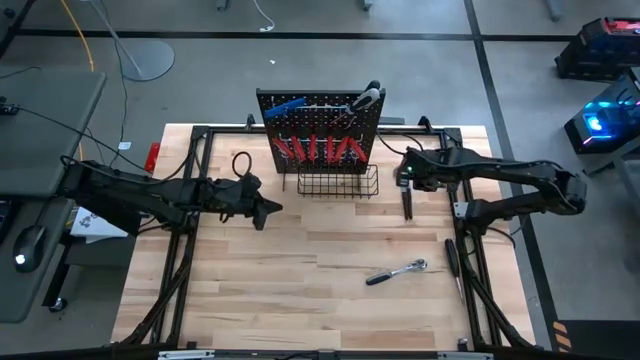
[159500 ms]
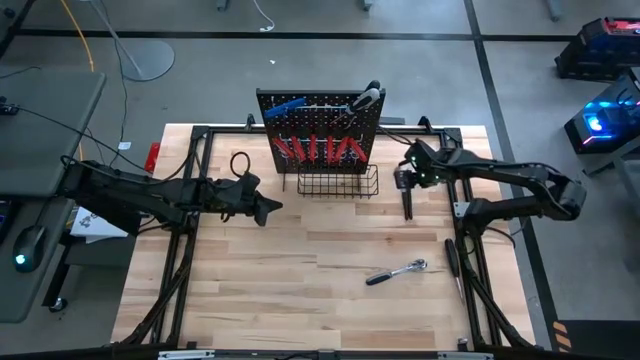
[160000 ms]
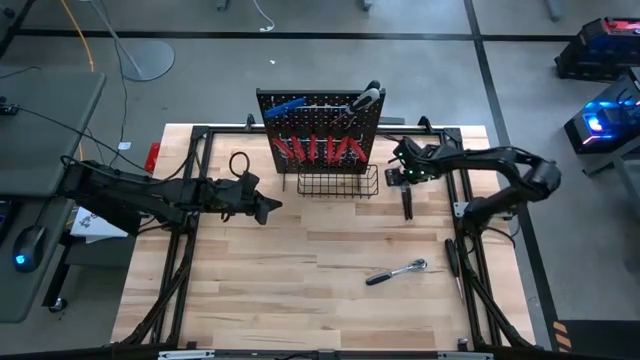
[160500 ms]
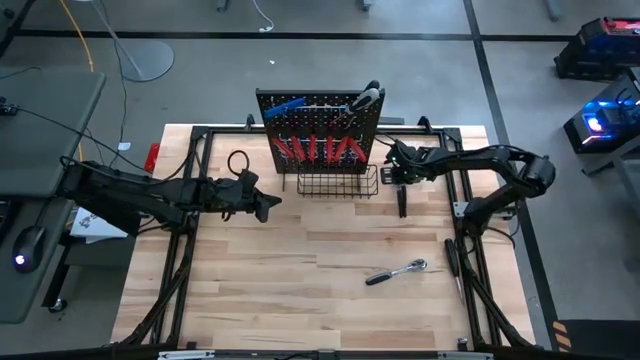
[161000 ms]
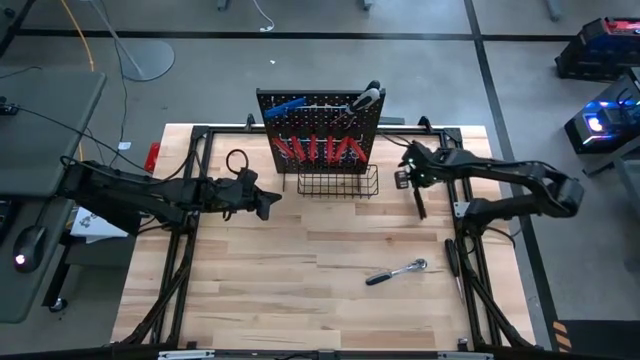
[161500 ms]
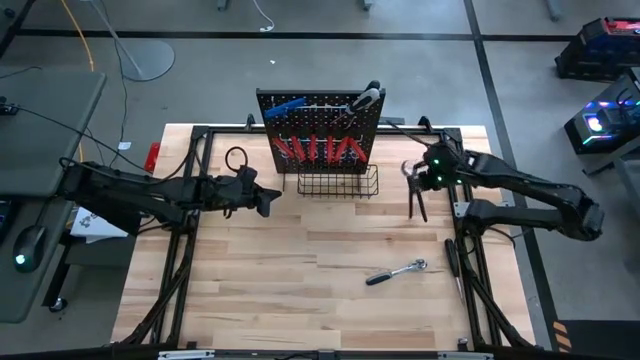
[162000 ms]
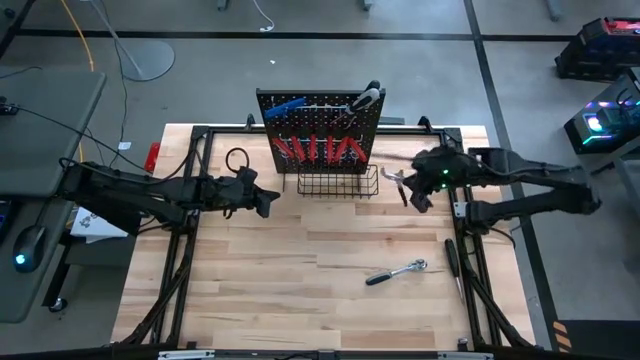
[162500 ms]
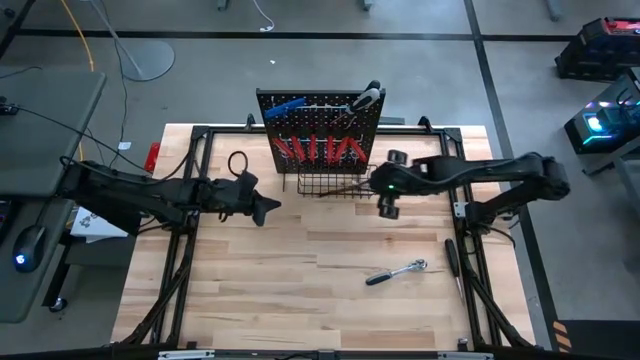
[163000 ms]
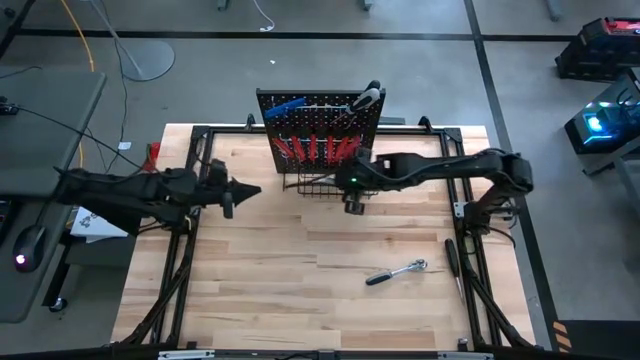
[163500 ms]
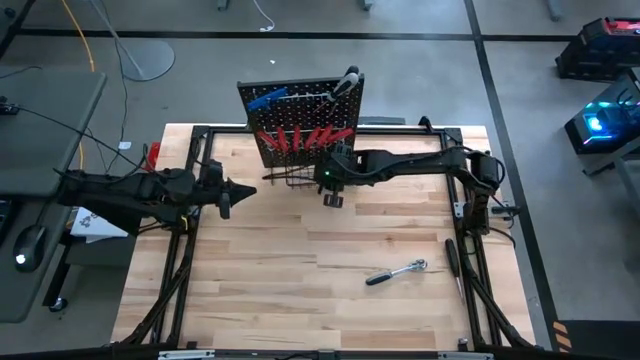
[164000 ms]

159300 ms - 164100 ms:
Task: Hang tools onto peg board
Put the slip joint pliers into the black wire basket on the peg board

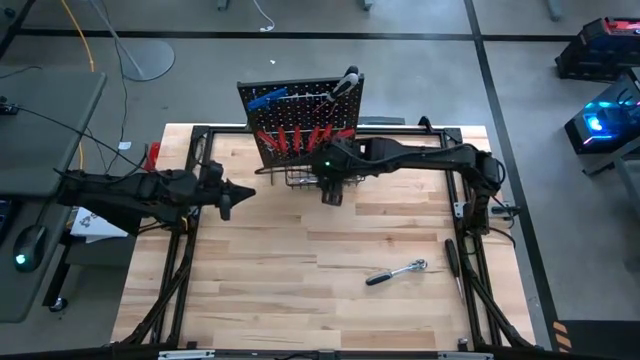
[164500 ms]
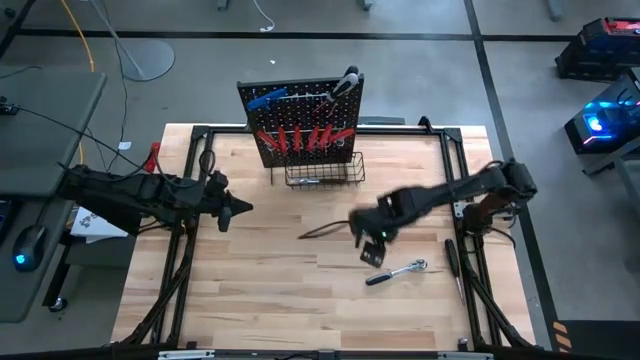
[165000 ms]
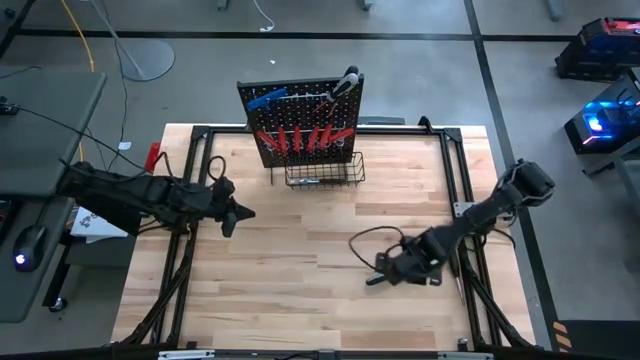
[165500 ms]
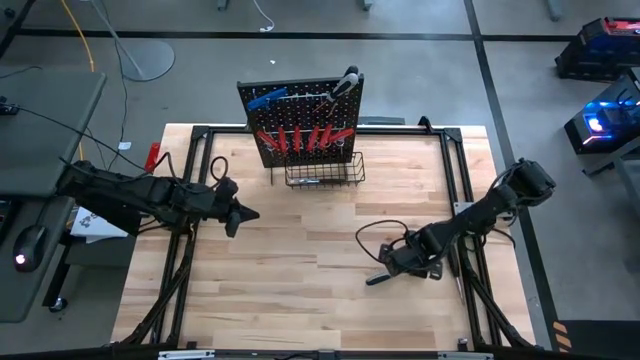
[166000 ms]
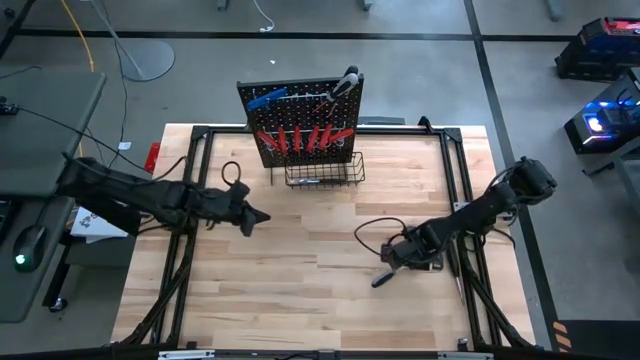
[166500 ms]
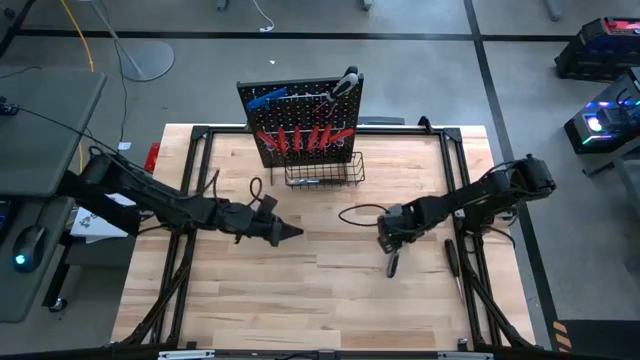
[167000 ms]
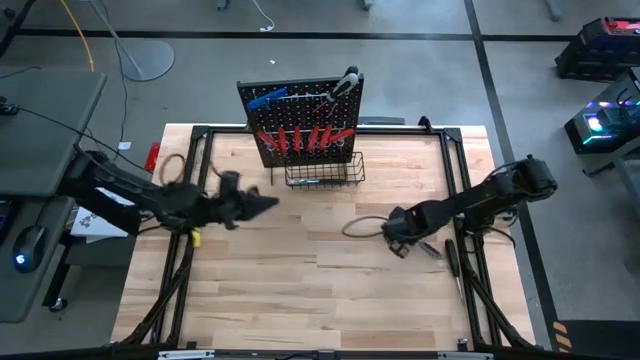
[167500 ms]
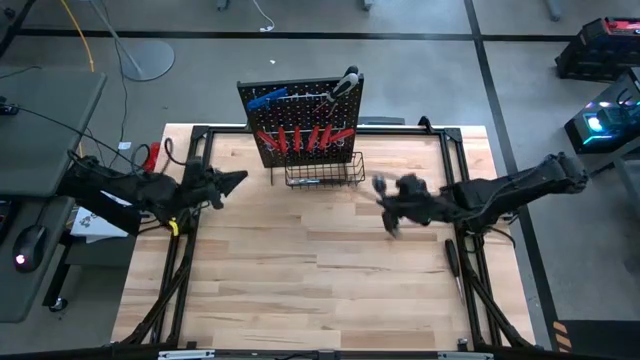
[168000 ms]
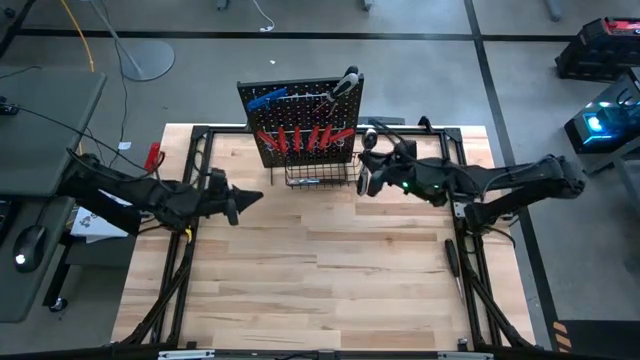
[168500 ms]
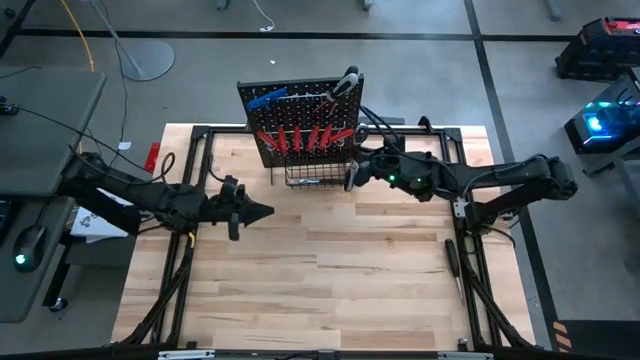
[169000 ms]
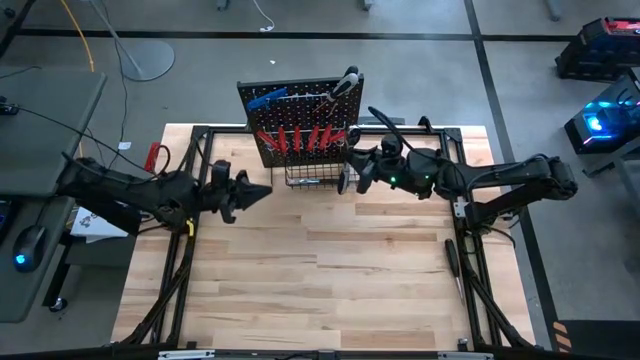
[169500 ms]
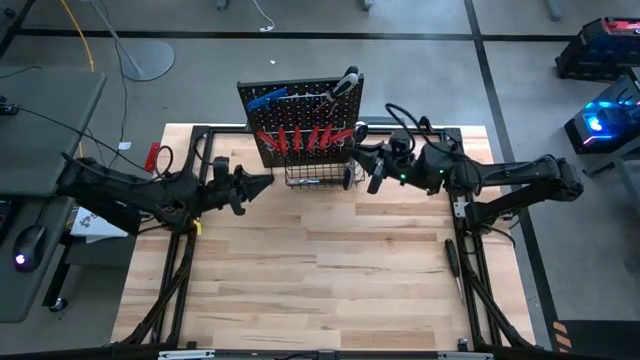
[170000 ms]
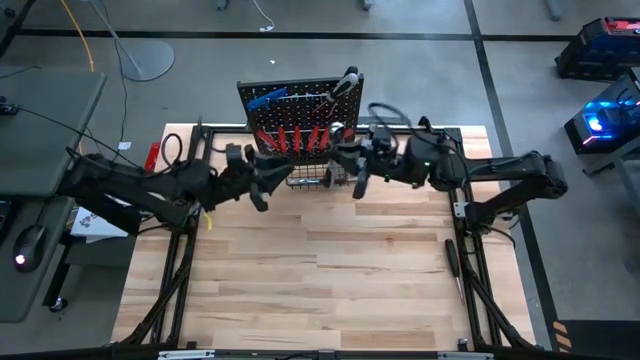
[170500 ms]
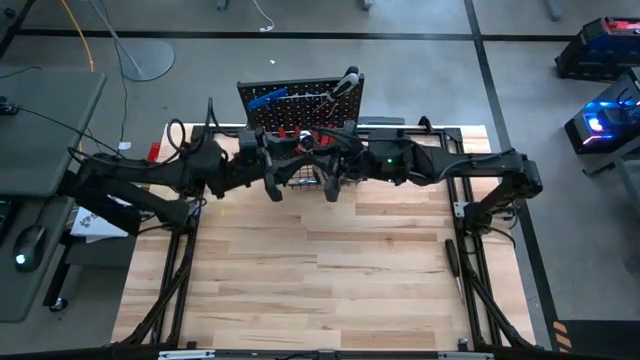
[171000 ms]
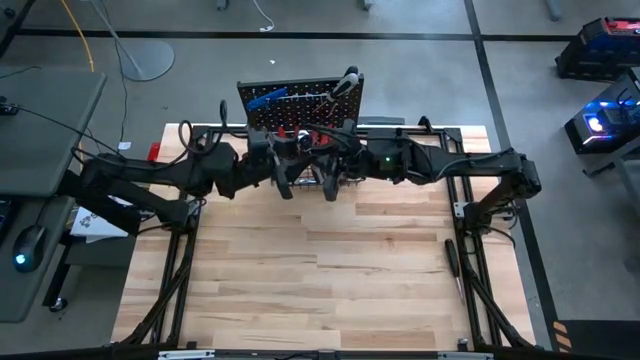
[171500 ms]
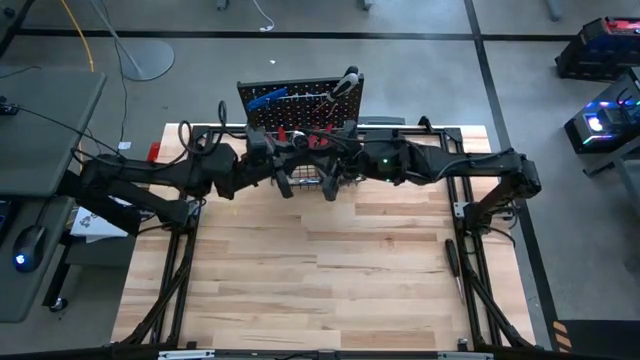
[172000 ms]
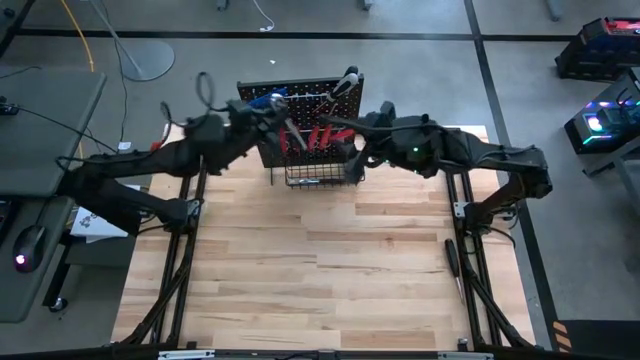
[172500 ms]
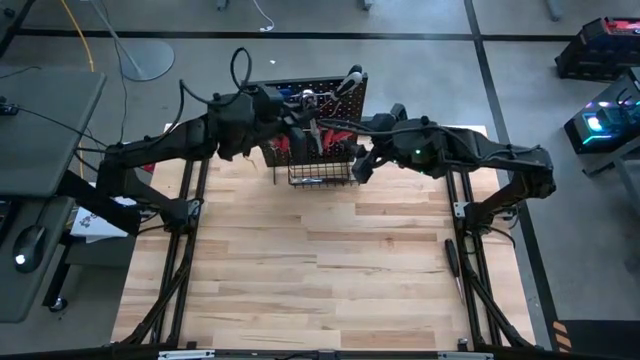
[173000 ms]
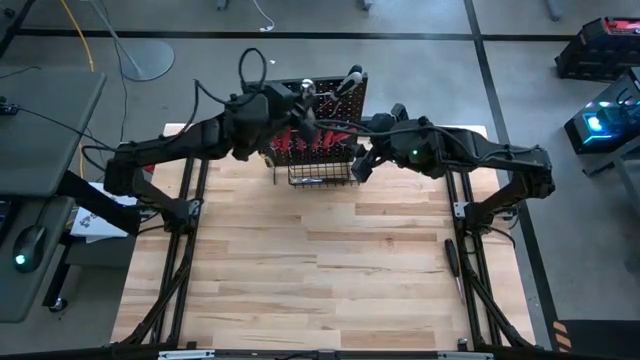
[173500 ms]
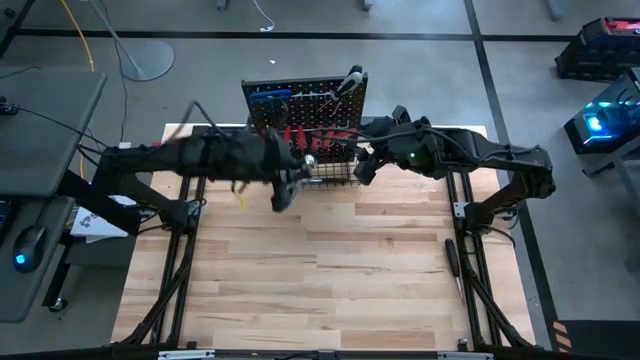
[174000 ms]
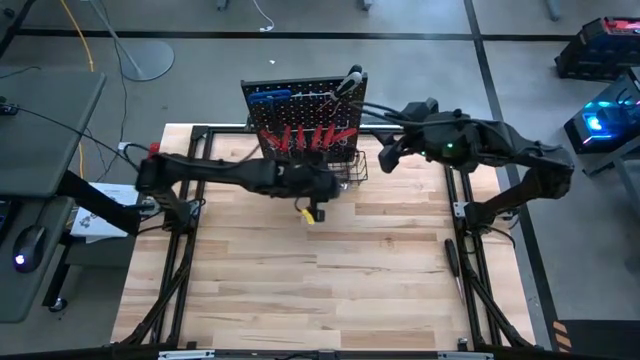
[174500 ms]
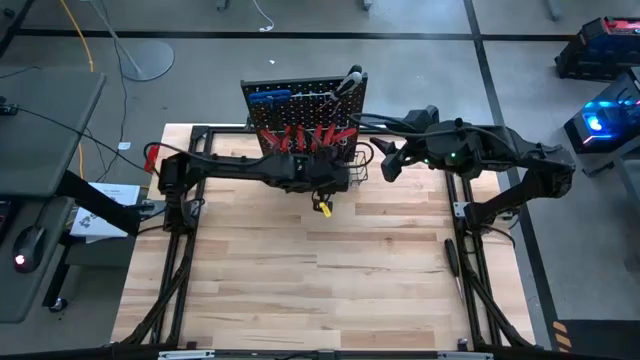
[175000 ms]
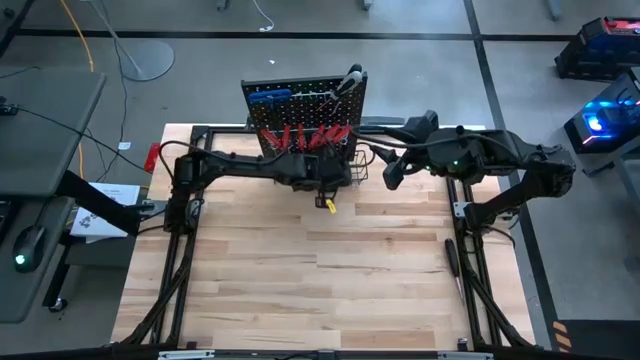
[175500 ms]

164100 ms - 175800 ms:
Put the ratchet wrench into the black wire basket on the peg board

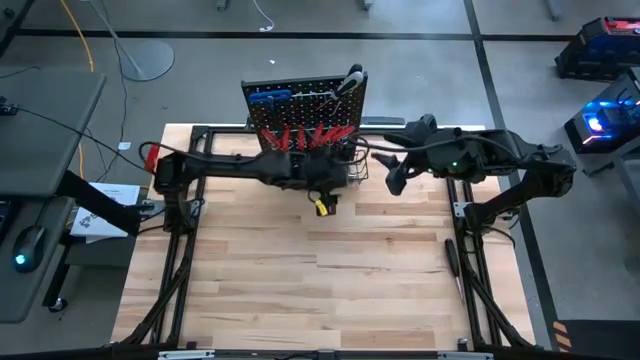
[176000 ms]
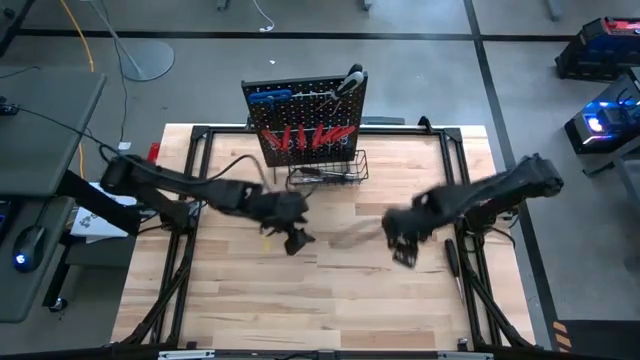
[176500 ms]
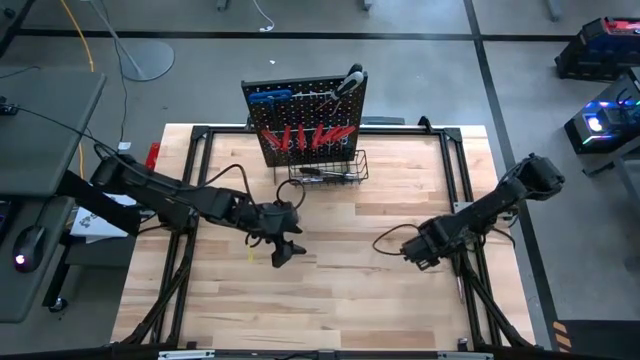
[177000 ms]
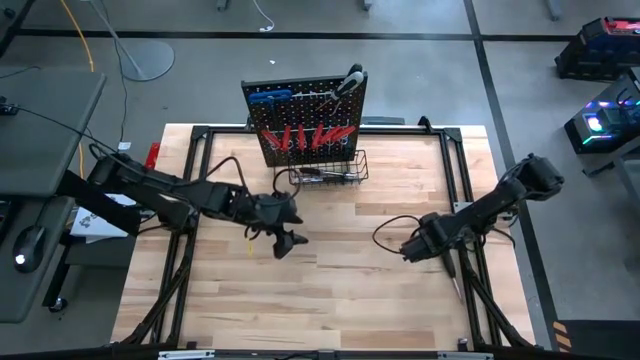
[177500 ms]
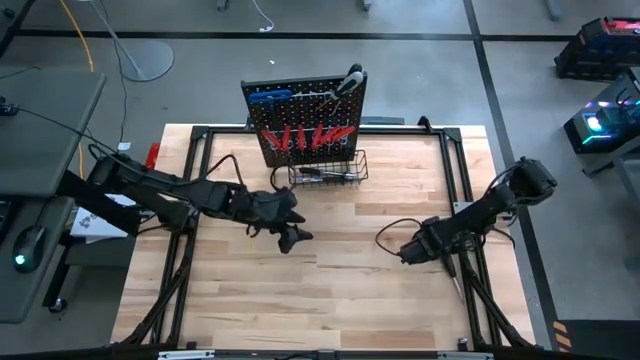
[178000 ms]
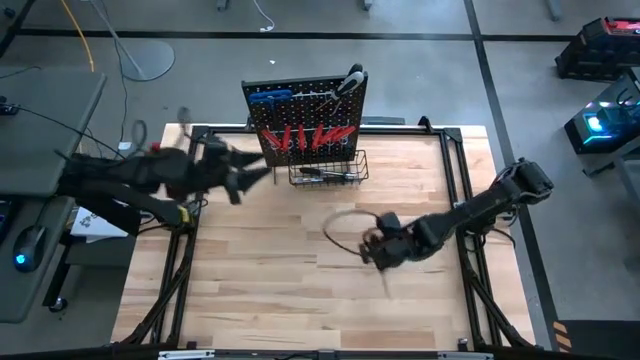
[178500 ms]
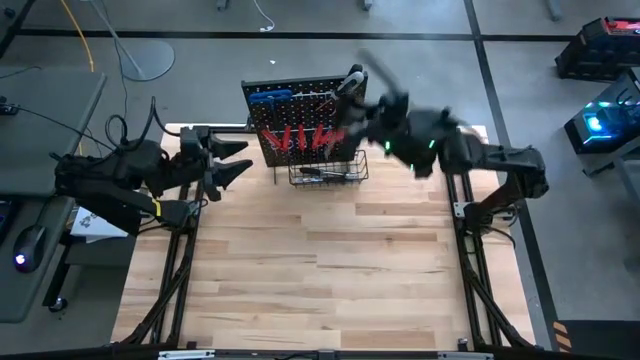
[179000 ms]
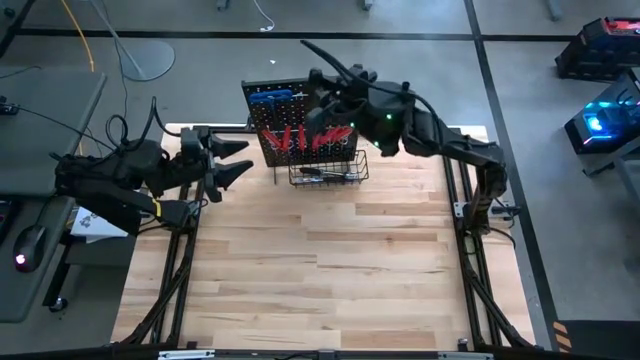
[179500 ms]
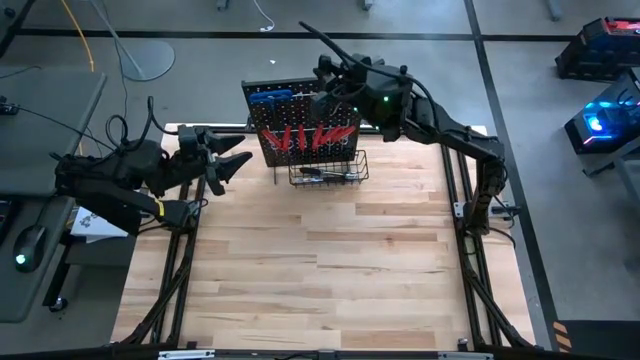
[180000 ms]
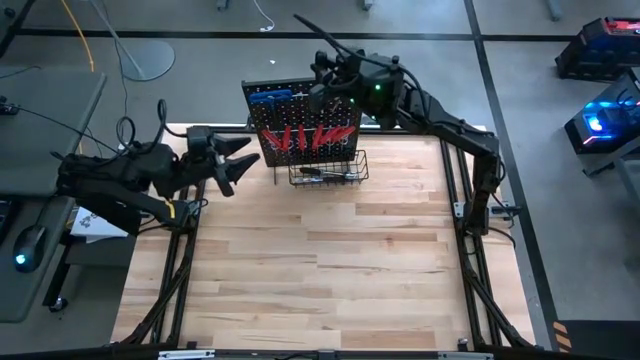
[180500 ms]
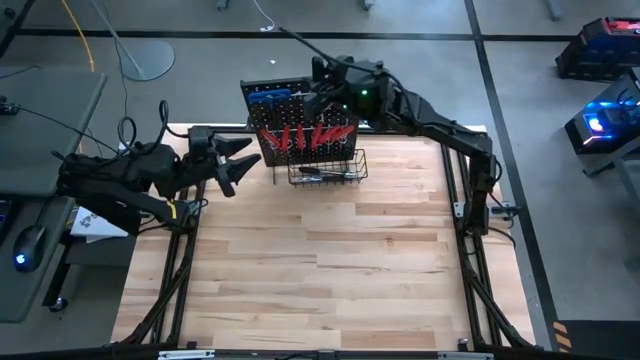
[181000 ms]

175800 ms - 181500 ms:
Hang the black screwdriver on the peg board

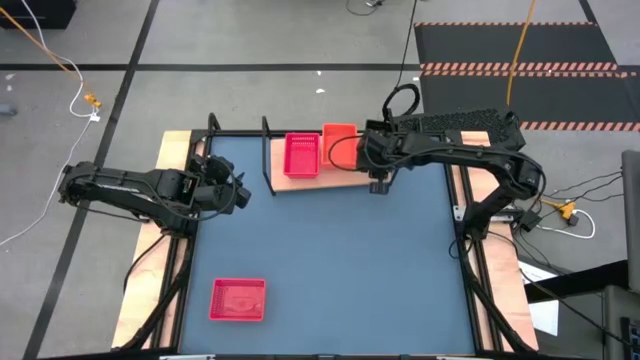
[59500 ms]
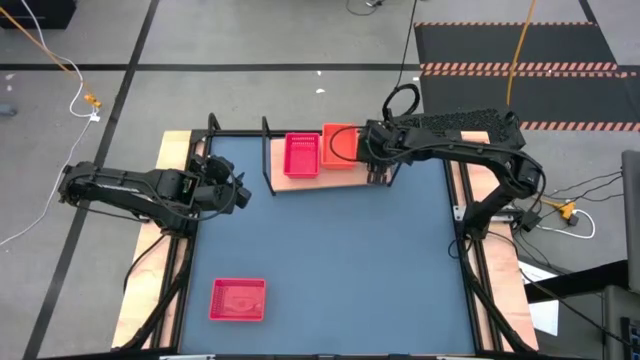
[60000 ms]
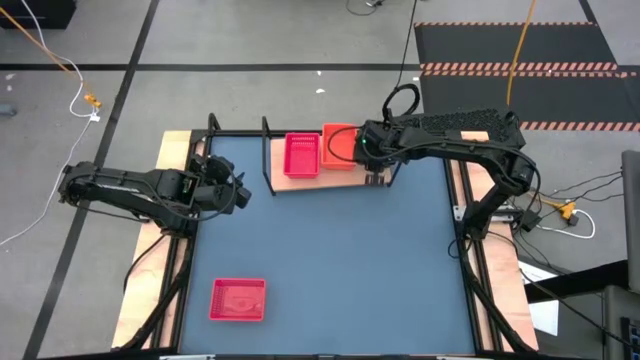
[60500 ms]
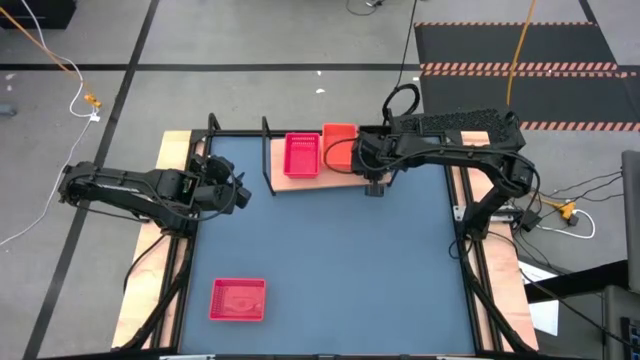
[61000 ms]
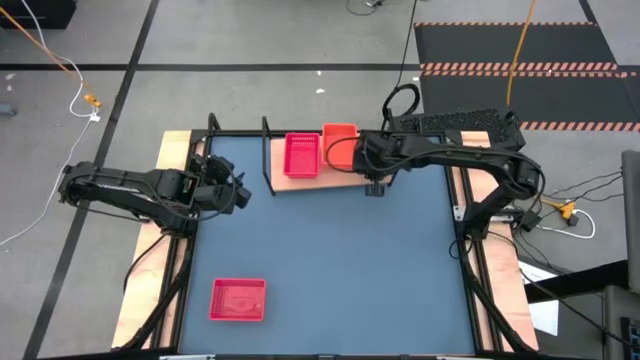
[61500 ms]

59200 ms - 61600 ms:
Task: Stack baskets on shelf by color
Adjust the stacked black bins on the shelf
